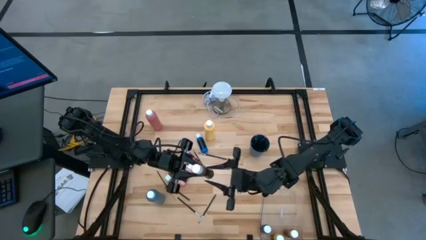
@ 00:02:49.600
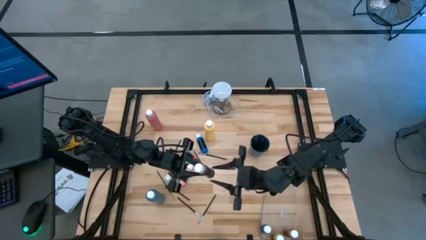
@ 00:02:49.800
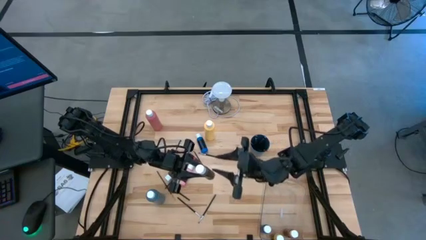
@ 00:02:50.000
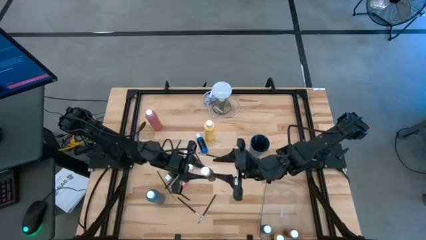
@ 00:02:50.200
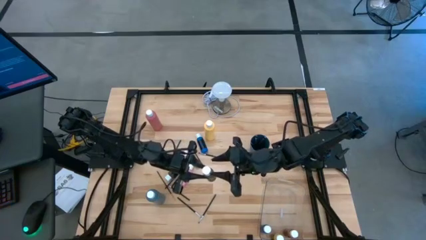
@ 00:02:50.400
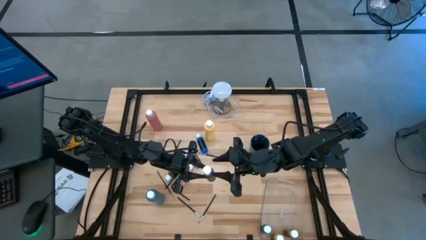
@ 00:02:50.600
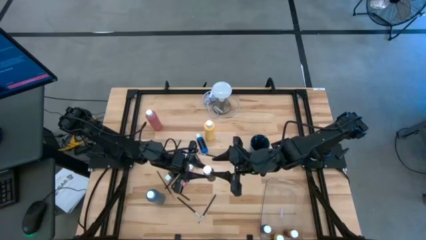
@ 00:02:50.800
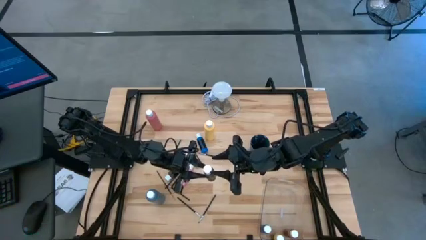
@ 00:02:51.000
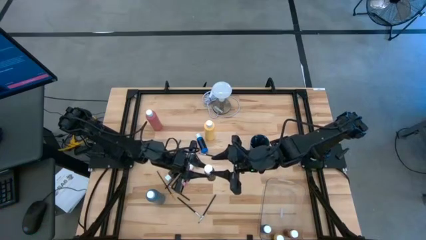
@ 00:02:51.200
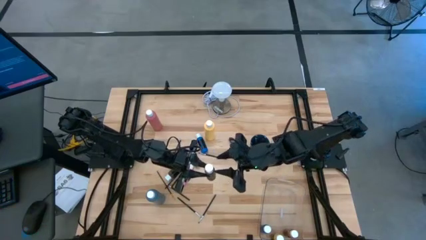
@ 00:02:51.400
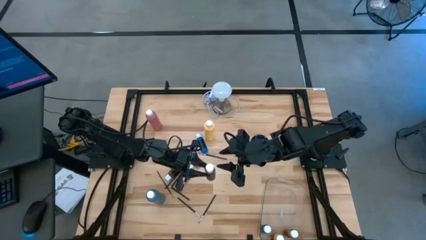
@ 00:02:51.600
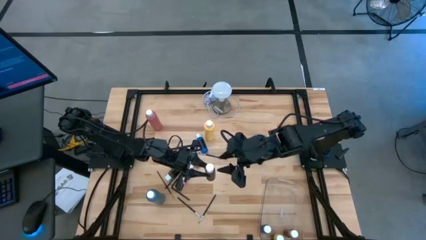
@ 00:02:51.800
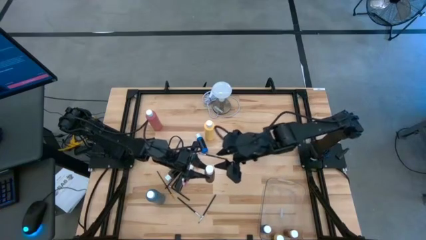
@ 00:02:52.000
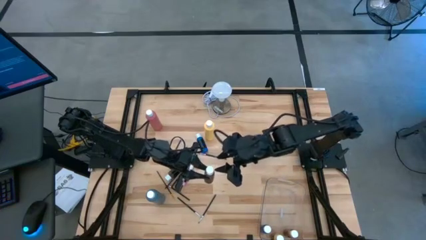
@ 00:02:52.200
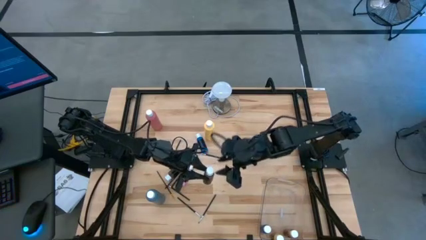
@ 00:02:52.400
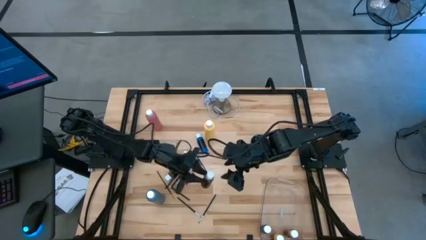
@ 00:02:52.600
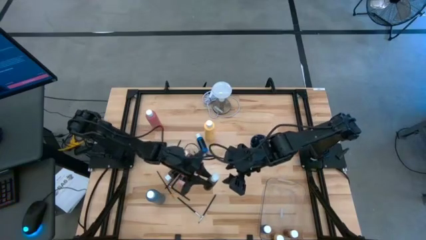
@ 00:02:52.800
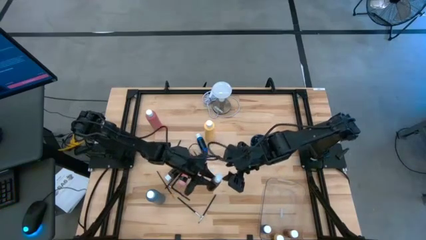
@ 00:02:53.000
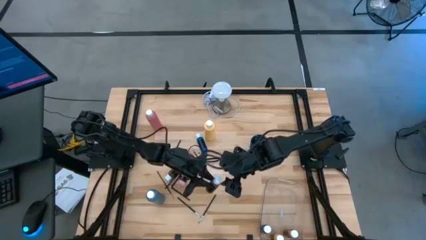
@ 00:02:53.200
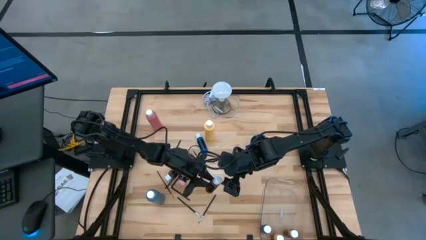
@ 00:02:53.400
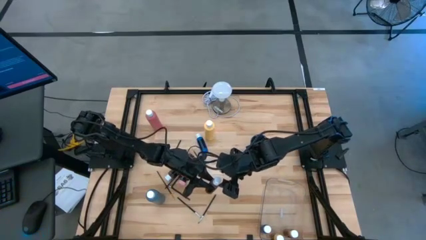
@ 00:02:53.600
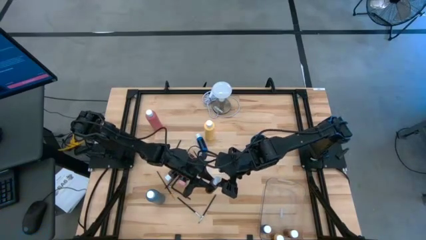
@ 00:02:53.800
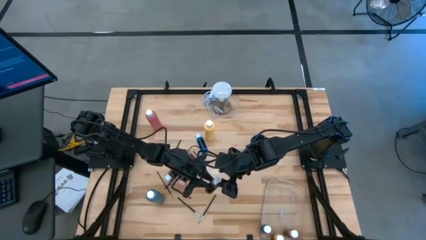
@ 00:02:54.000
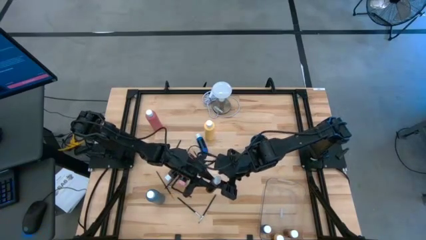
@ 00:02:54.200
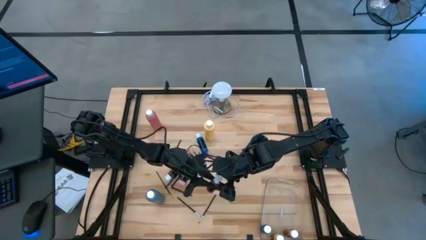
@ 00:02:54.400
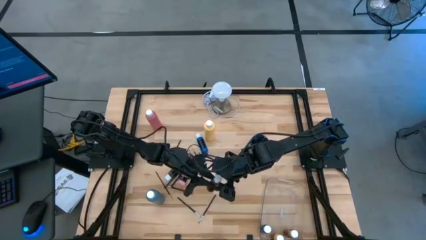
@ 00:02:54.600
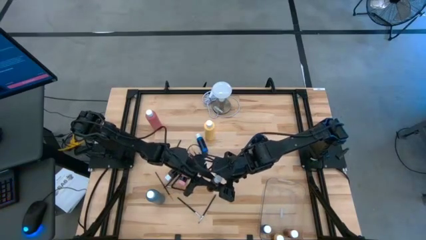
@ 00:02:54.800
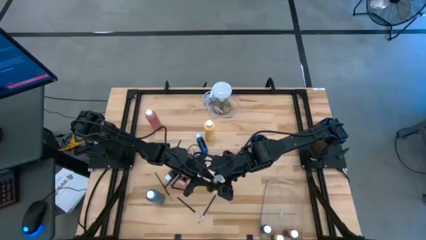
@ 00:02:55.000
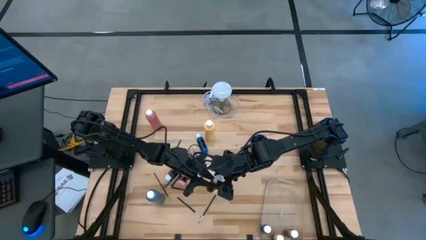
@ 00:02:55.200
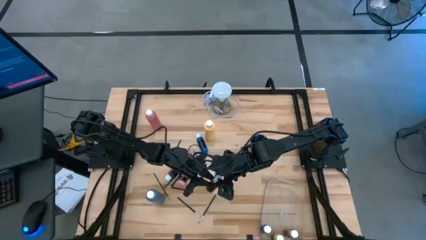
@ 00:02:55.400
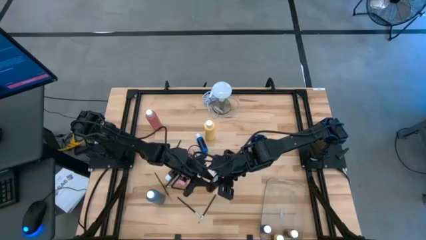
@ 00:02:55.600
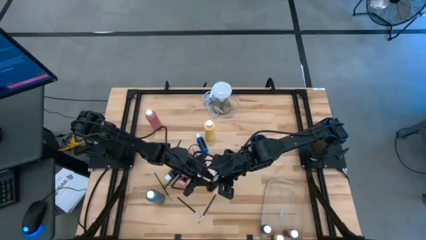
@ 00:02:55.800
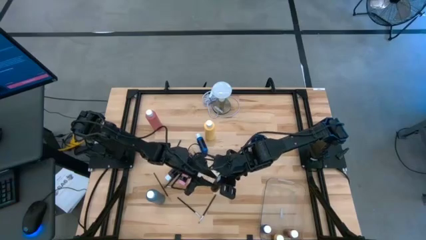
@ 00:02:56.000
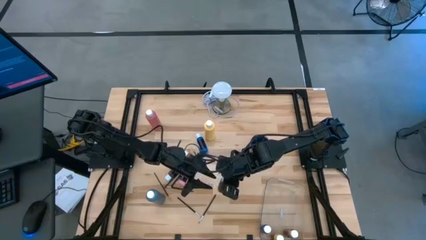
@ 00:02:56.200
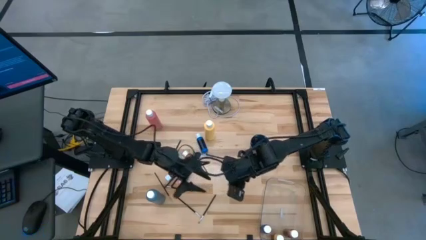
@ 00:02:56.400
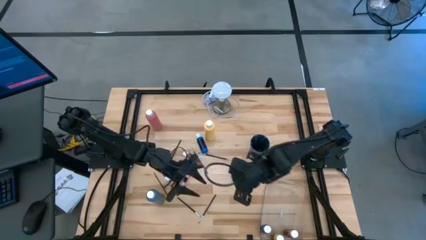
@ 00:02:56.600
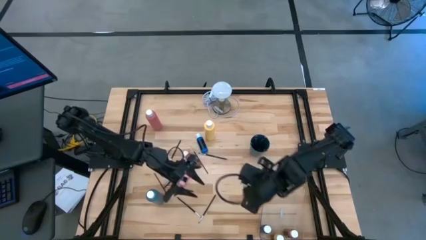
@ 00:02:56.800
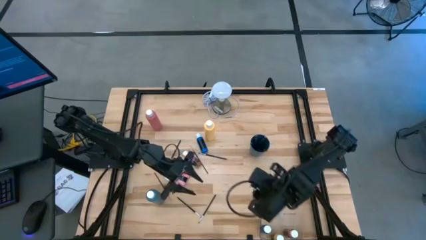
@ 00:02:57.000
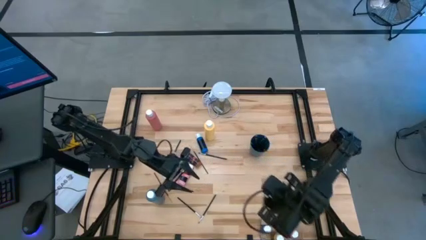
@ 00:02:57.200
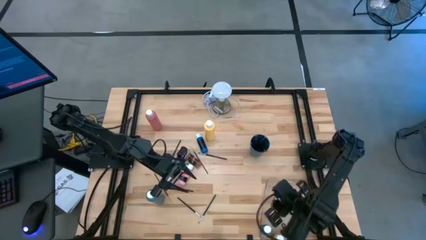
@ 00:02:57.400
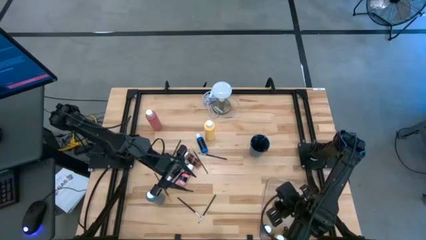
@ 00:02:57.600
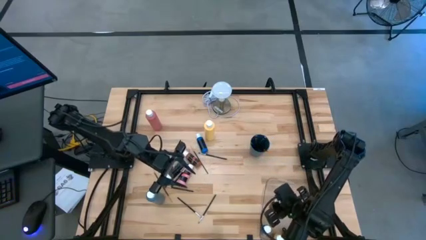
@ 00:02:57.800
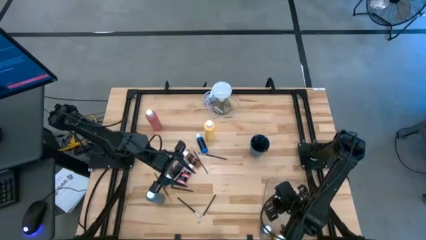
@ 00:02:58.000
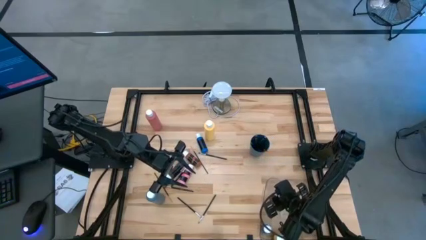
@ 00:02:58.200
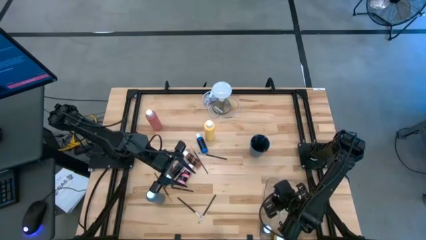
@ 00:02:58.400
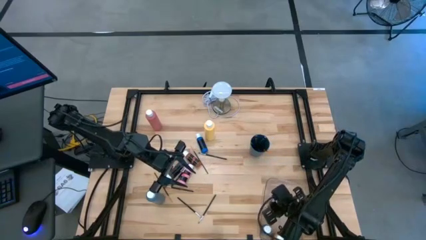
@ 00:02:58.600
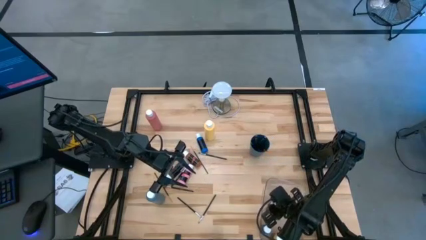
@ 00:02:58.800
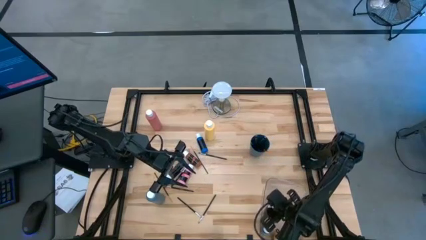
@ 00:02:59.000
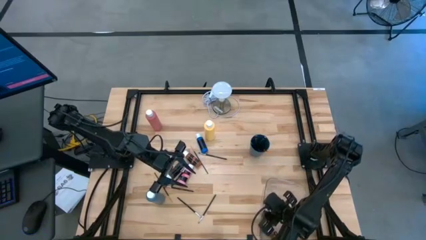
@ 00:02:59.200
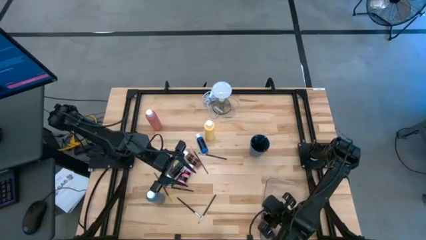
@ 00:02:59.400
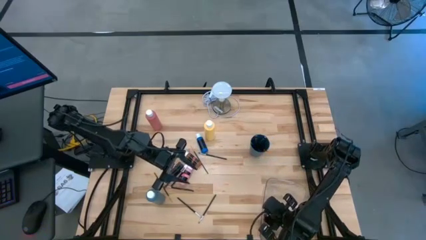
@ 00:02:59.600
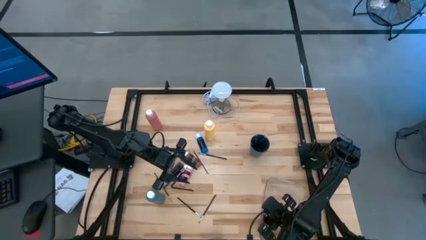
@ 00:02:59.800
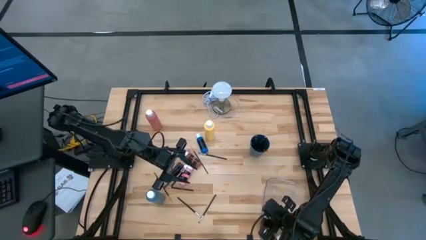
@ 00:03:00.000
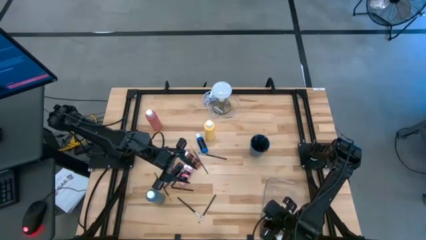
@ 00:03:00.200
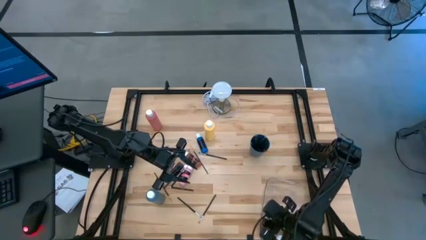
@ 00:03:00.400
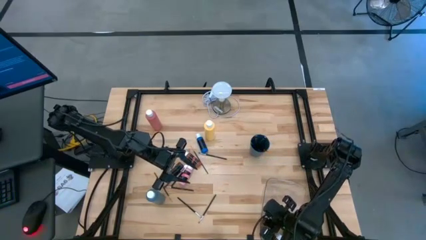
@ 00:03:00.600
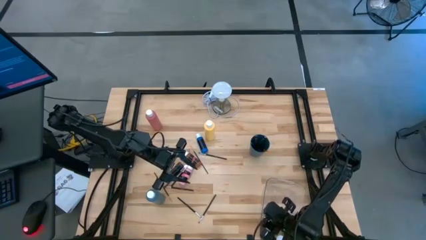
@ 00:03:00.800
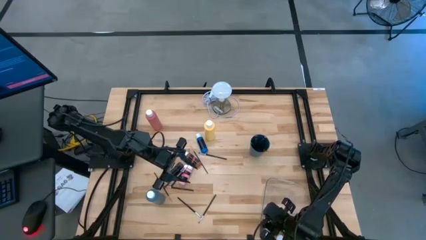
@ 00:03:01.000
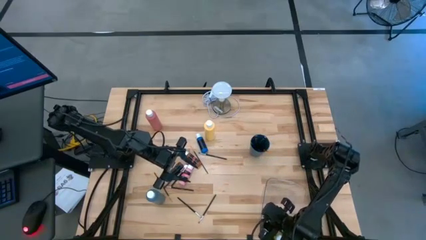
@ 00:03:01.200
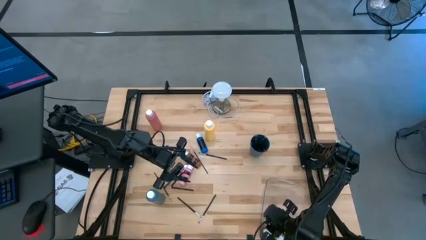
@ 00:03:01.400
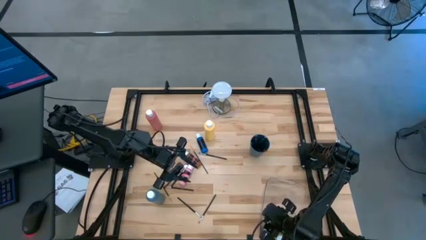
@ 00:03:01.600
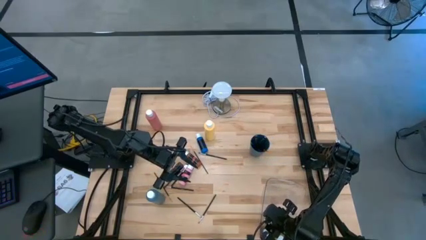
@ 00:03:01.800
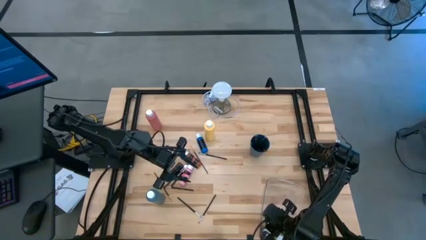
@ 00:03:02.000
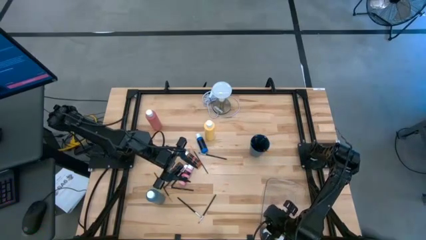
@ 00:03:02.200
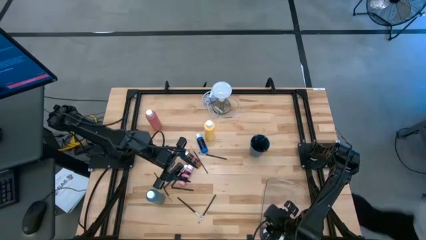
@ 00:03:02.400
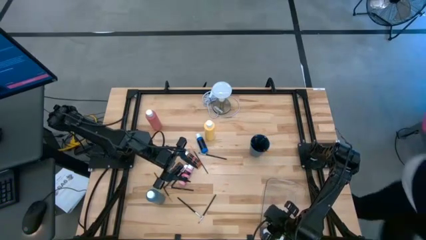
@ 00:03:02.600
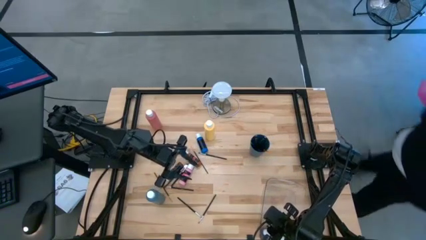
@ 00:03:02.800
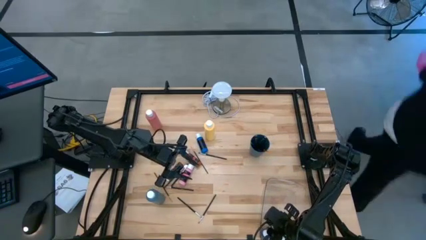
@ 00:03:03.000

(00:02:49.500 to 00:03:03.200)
Task: Pick & Place Paint Supplies
Put the small dark green paint bottle into the transparent bin
